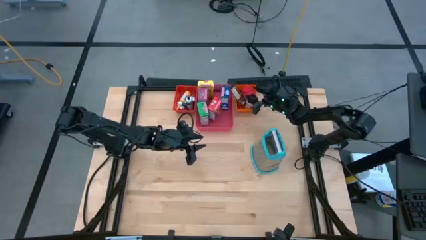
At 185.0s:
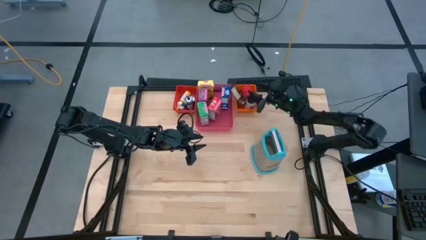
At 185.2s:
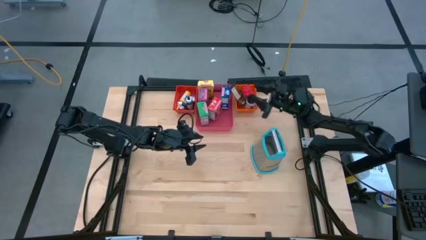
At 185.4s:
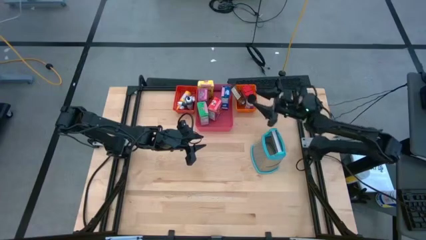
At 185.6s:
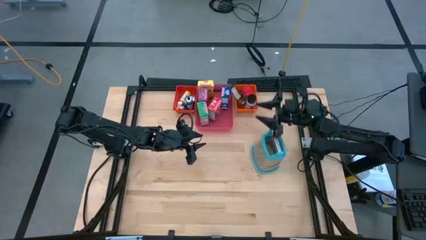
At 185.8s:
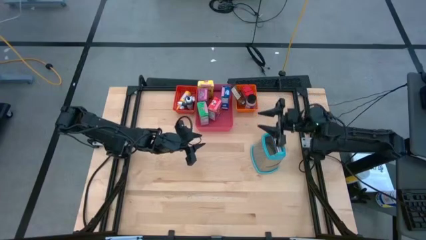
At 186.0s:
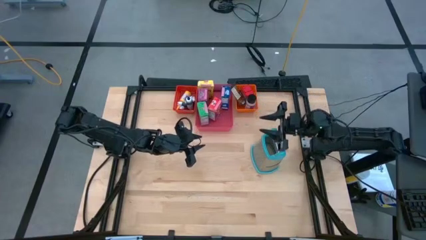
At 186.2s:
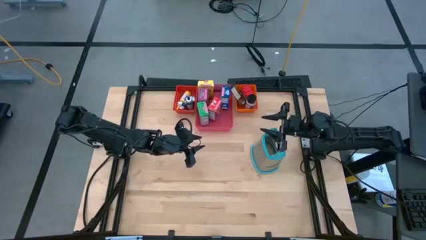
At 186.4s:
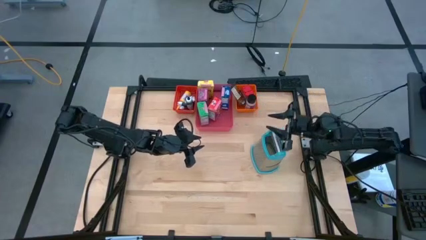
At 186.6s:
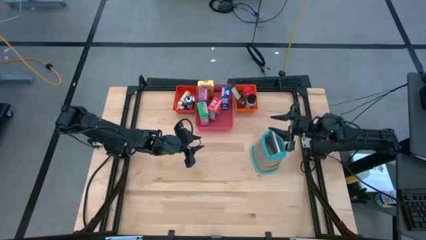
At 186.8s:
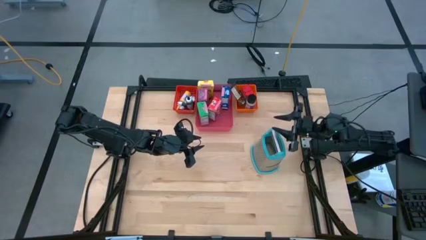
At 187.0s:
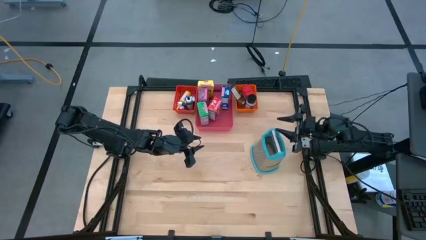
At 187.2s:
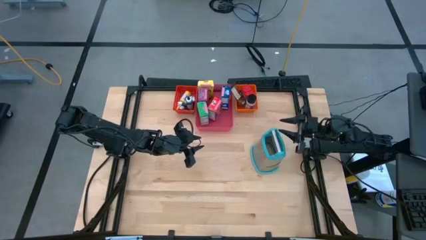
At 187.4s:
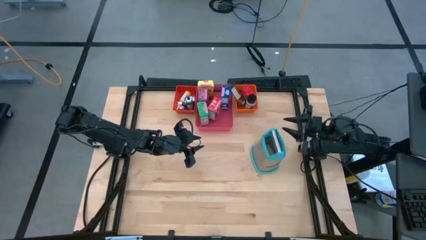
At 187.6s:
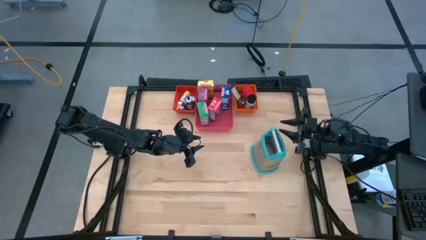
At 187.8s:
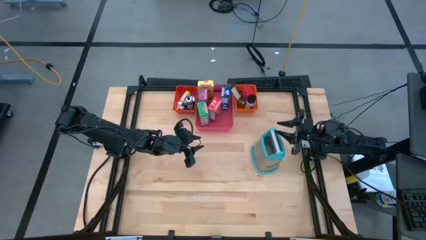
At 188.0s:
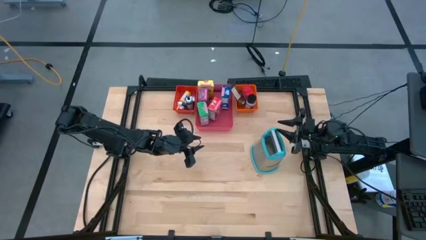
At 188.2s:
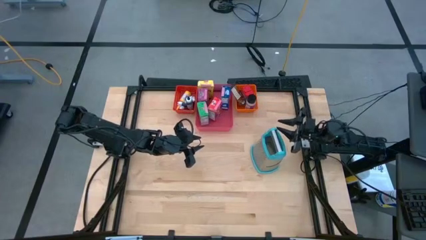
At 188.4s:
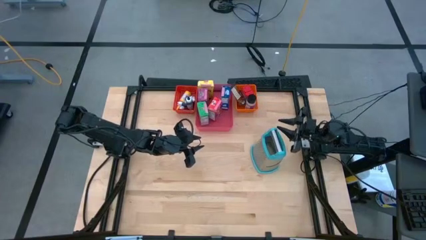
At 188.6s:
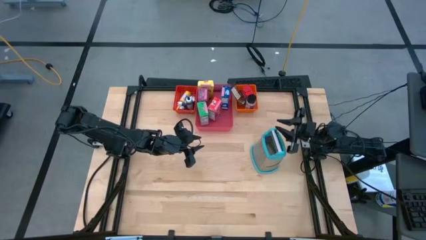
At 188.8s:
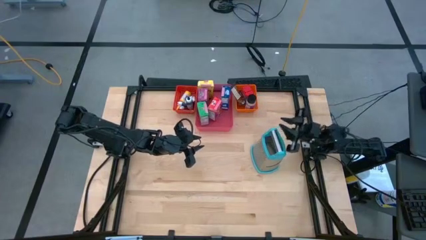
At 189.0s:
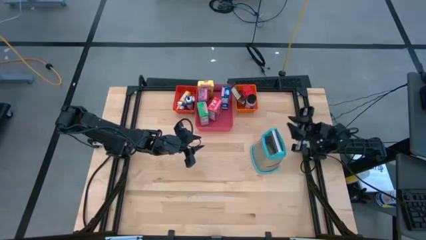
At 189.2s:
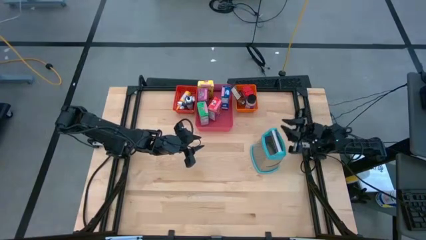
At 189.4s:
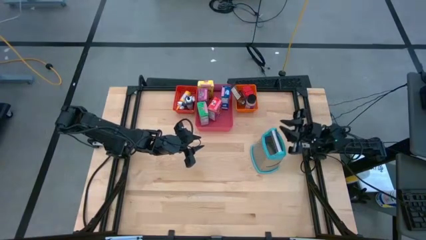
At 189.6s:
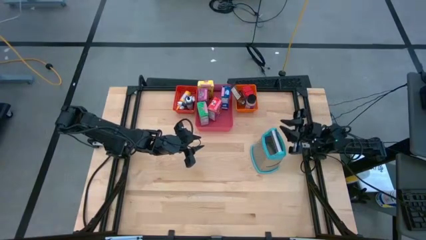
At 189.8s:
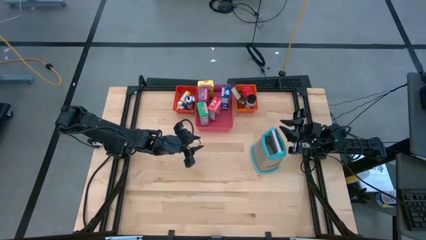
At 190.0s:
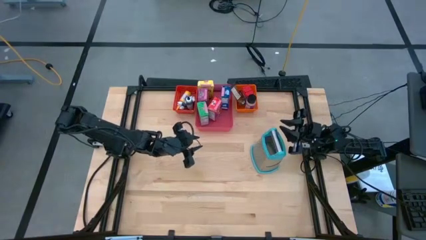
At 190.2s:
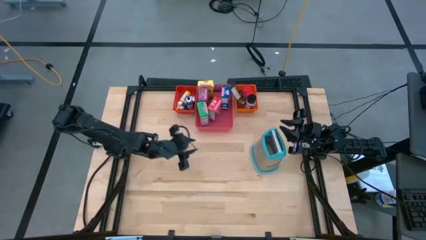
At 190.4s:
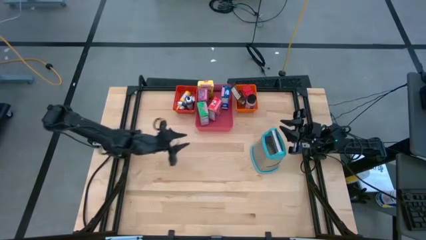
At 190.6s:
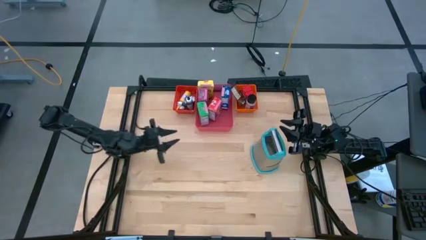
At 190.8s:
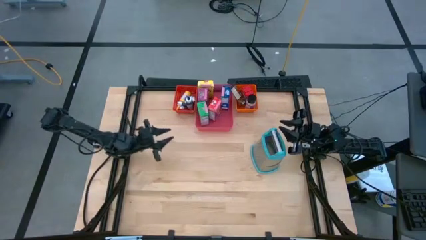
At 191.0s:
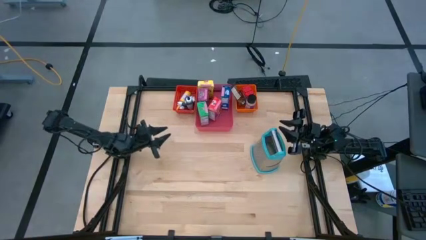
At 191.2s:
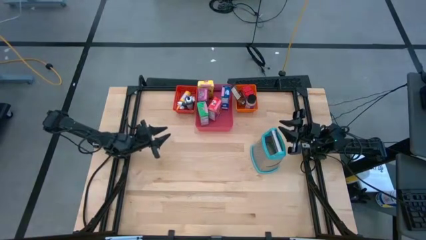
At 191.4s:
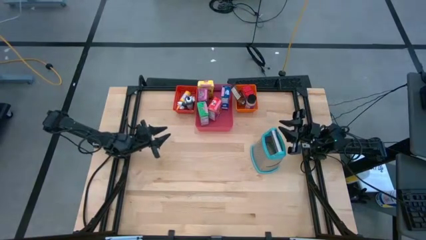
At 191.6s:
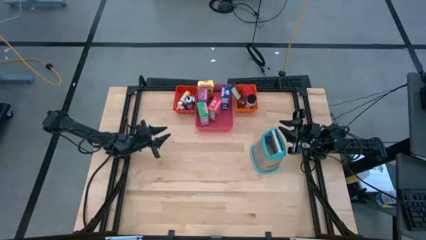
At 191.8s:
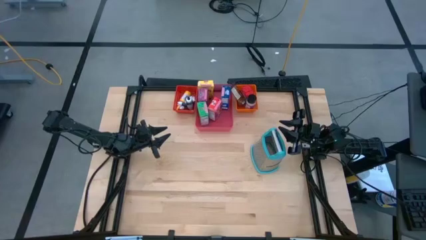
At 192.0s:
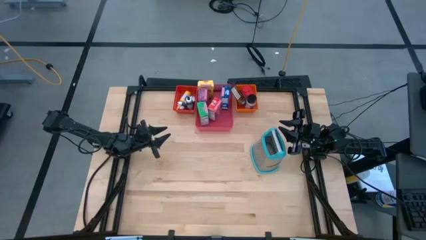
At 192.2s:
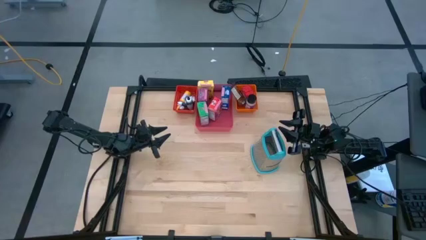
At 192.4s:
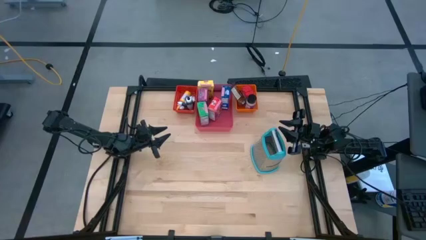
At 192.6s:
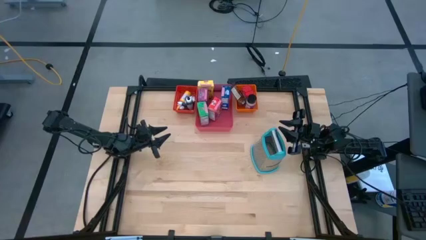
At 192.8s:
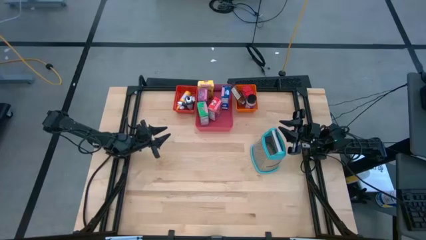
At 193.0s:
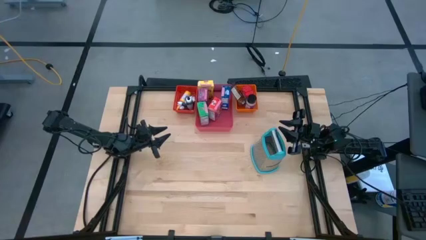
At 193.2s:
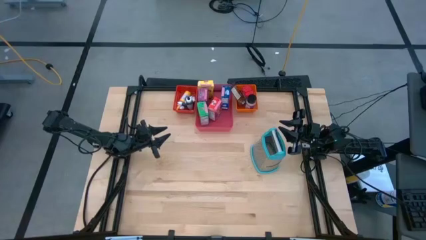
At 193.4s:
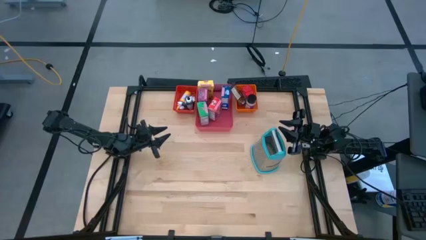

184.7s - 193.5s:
Task: Pick & Place Kitchen Items
Return to Home Position

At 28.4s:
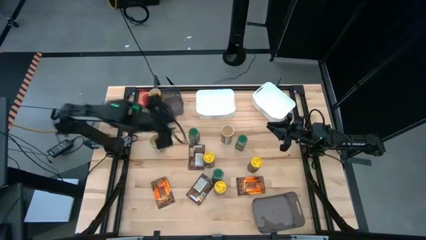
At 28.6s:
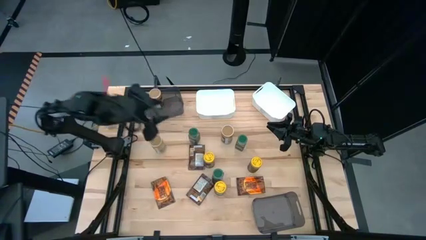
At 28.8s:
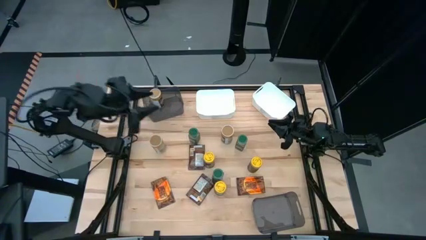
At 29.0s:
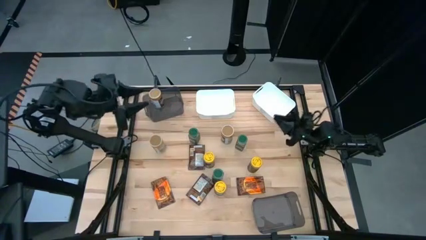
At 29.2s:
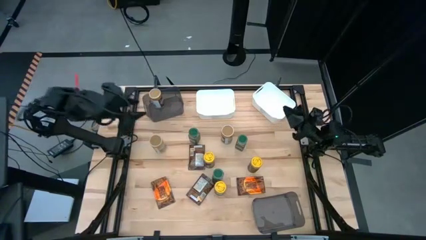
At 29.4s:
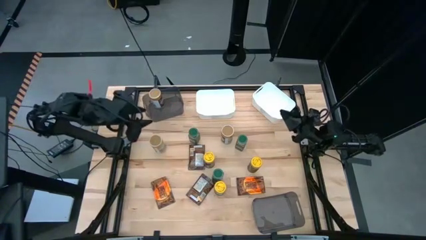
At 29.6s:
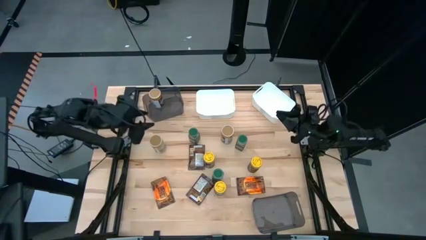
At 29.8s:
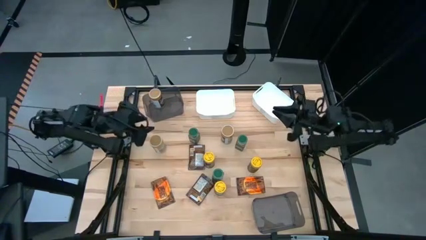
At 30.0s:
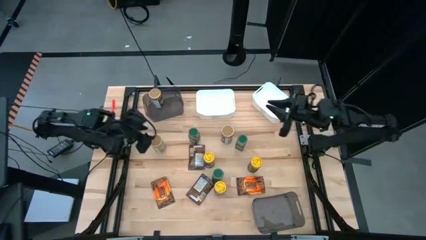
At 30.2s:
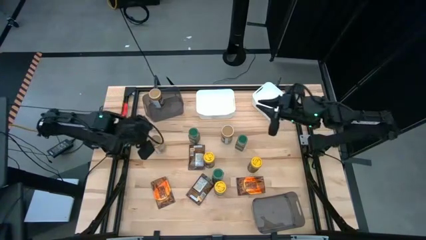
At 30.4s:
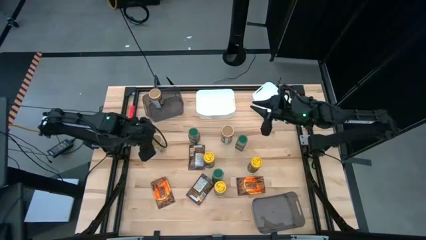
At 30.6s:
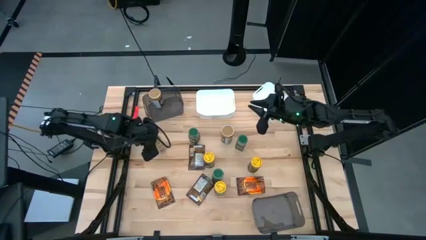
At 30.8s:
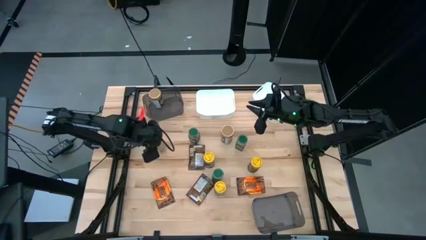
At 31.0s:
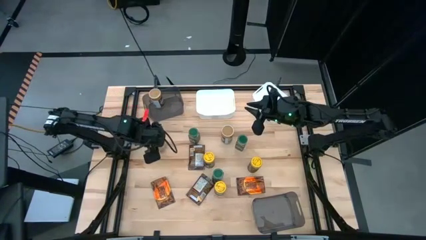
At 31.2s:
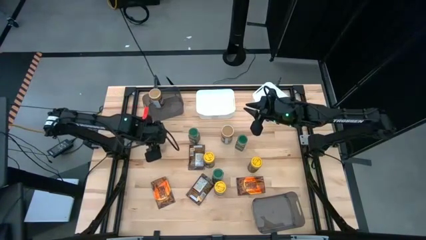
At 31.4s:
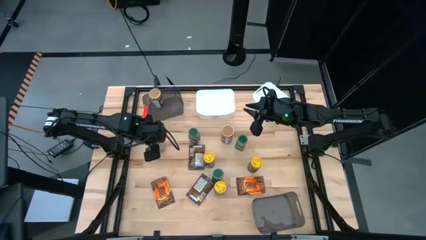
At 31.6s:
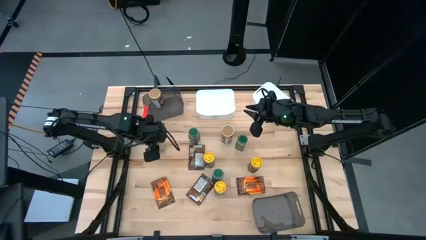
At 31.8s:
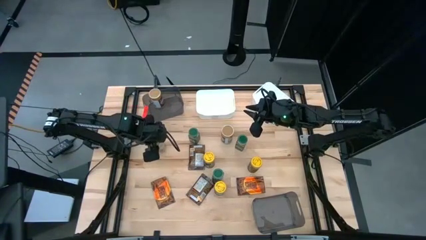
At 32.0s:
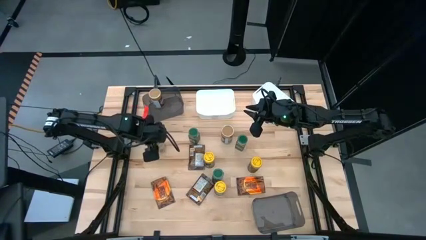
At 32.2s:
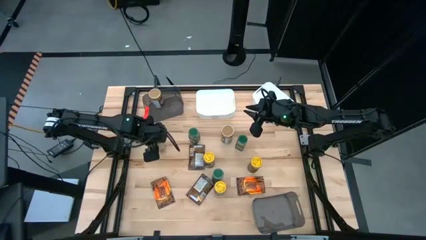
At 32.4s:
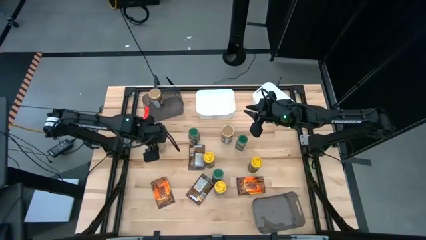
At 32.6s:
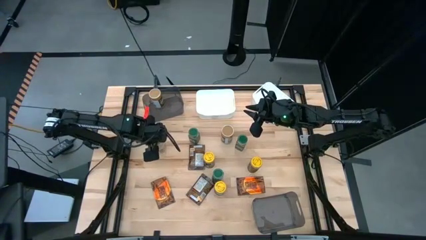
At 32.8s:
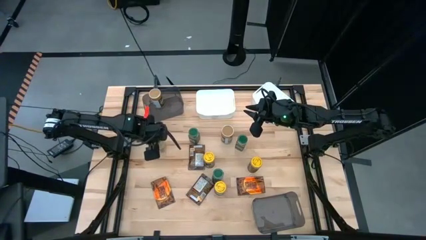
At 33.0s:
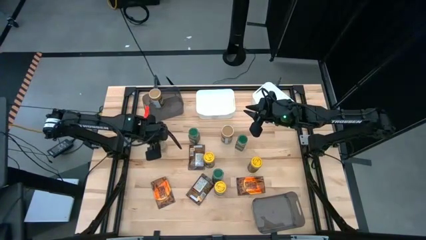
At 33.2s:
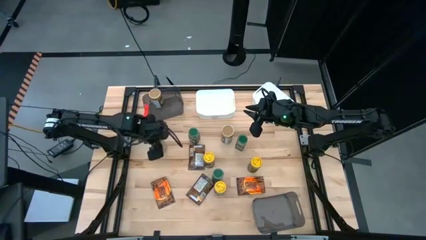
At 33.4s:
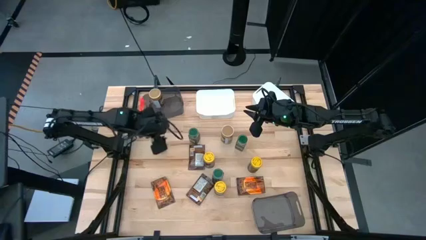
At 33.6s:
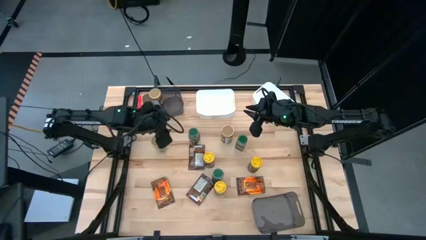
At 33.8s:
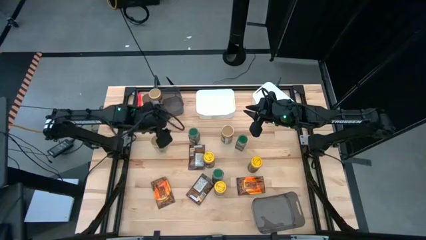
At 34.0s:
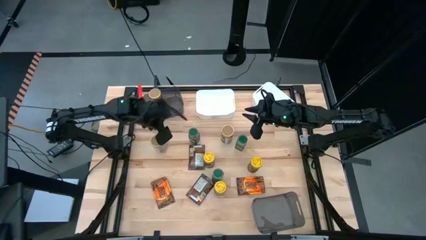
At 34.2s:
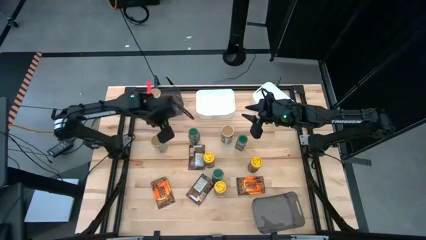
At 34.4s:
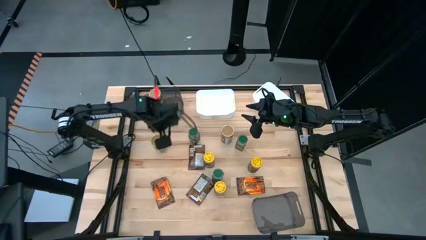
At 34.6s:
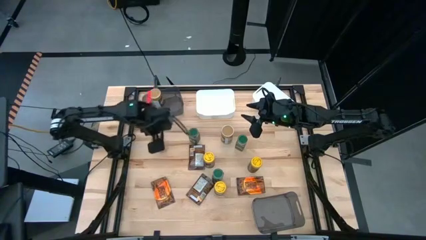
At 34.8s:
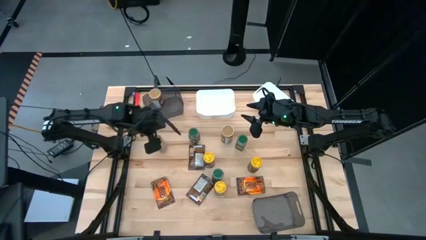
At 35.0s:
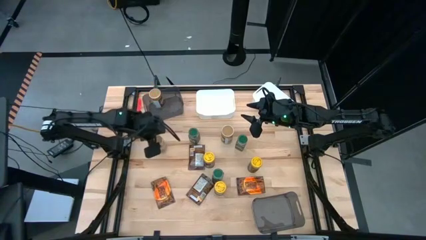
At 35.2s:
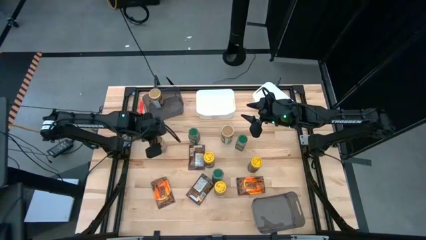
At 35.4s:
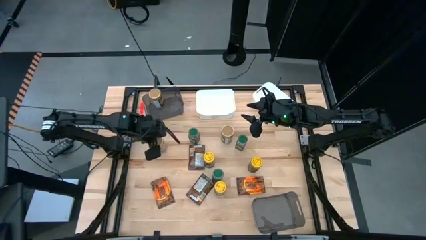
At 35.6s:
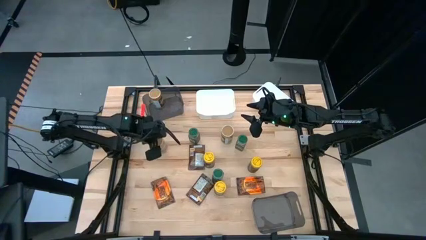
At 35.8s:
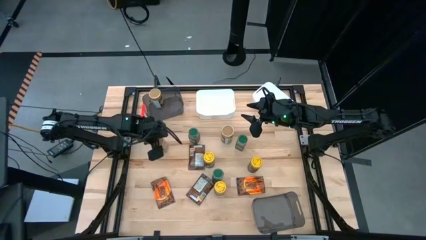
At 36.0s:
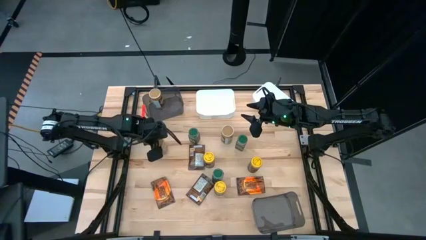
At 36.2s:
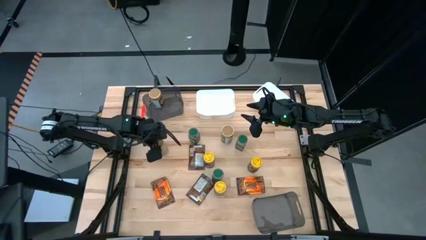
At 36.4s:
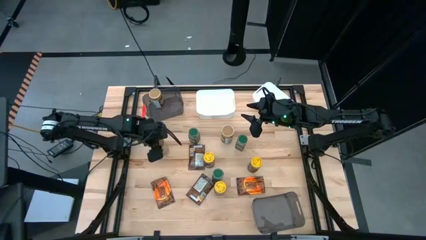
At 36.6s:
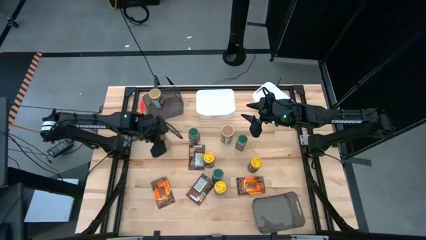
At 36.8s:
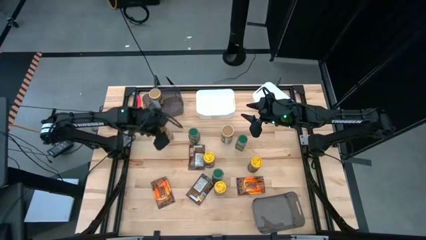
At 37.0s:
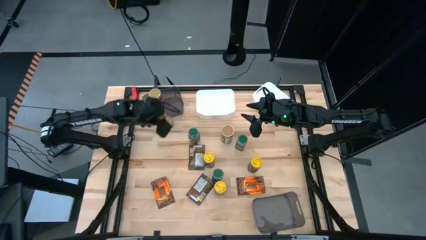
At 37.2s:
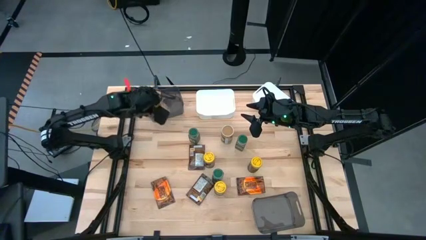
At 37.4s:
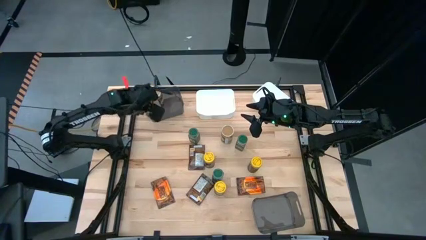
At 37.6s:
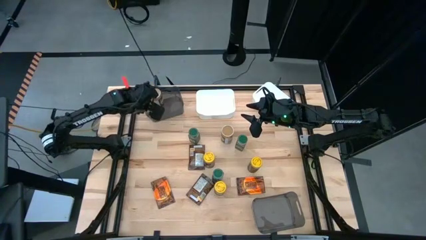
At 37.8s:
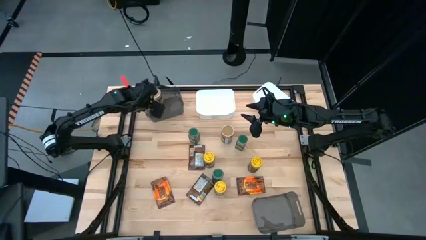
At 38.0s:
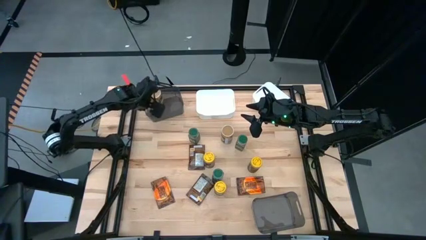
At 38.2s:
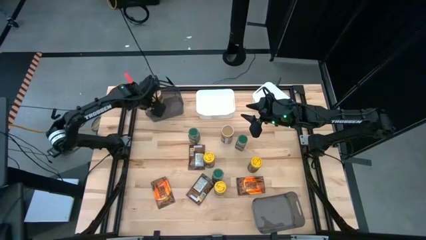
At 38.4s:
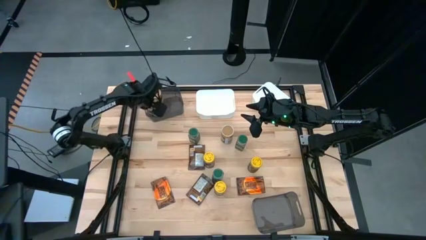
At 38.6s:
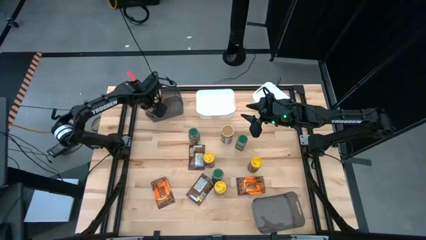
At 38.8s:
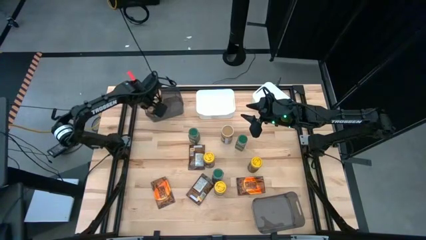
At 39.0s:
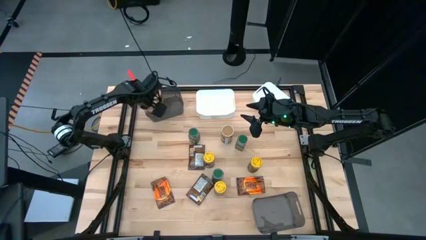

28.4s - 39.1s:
Task: Sort spices by type
Put the gold seasoning bottle into the top black bin
